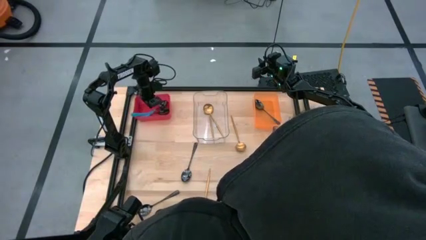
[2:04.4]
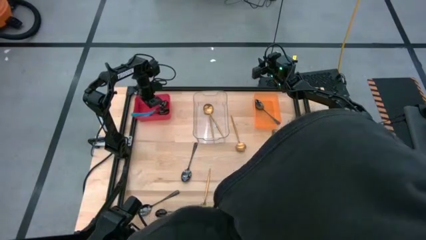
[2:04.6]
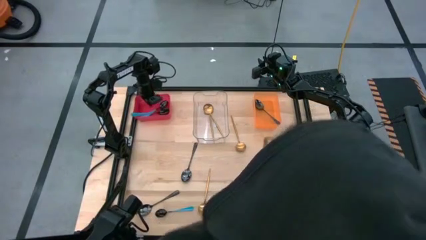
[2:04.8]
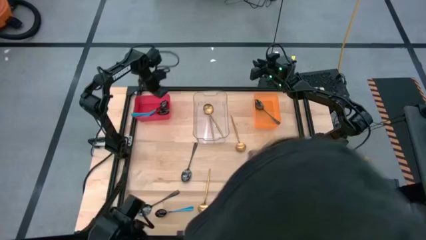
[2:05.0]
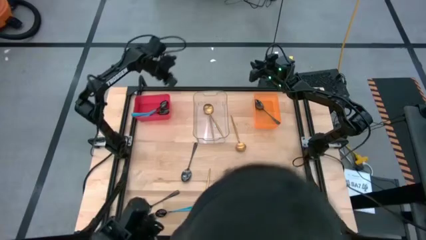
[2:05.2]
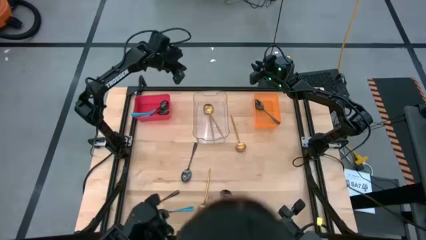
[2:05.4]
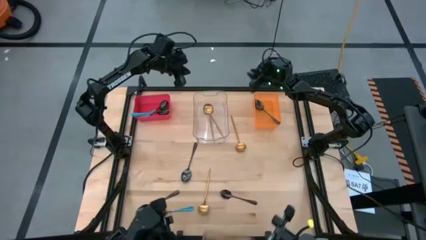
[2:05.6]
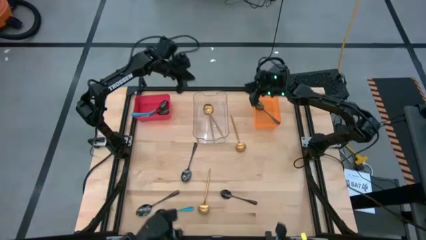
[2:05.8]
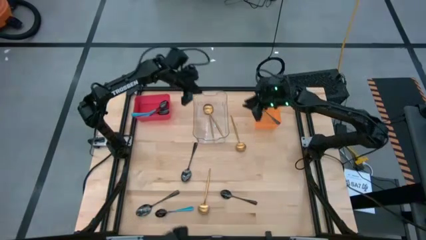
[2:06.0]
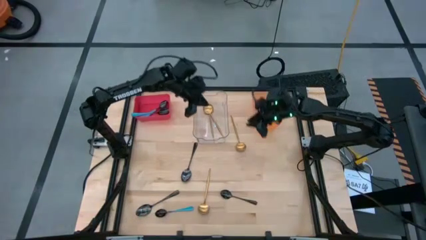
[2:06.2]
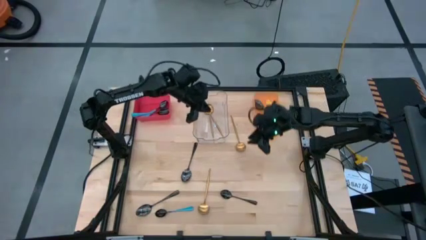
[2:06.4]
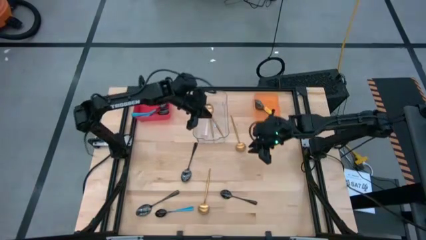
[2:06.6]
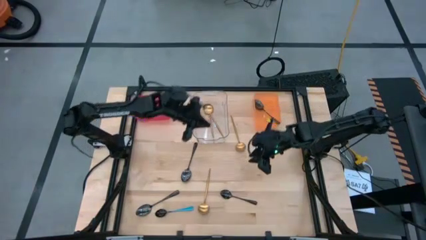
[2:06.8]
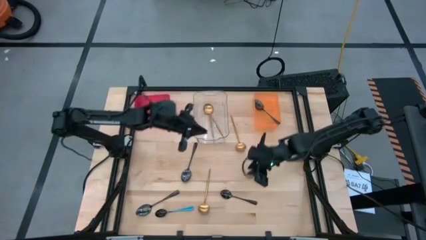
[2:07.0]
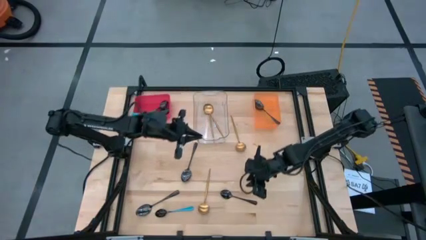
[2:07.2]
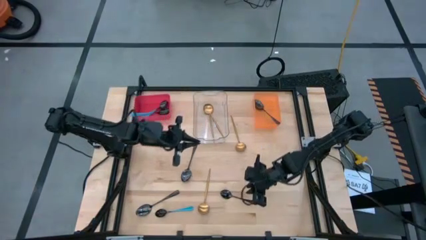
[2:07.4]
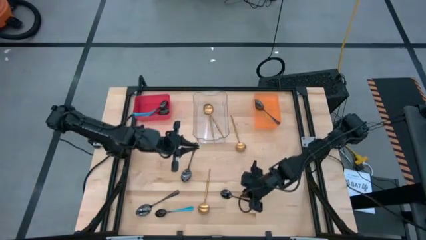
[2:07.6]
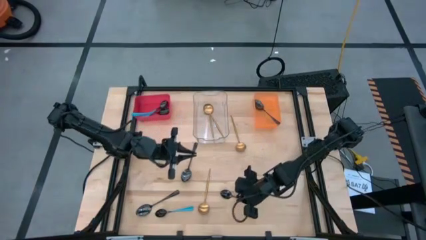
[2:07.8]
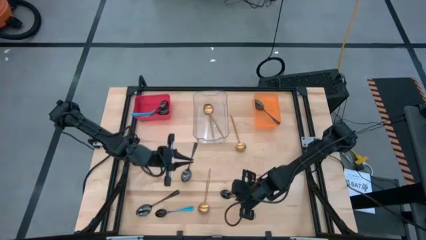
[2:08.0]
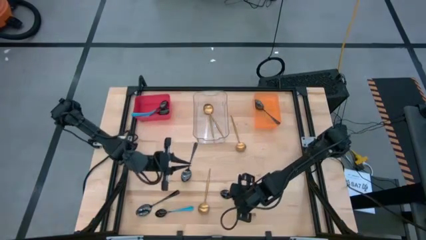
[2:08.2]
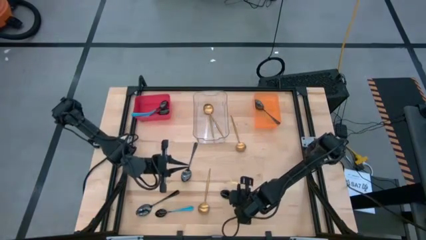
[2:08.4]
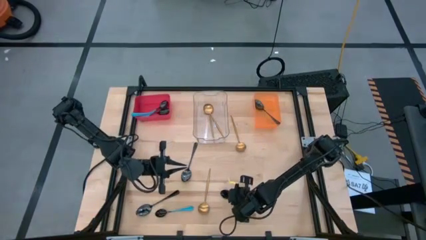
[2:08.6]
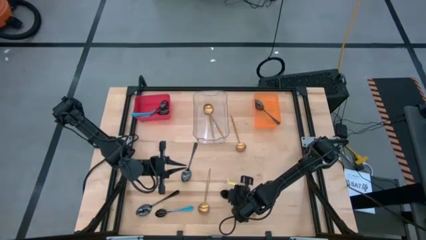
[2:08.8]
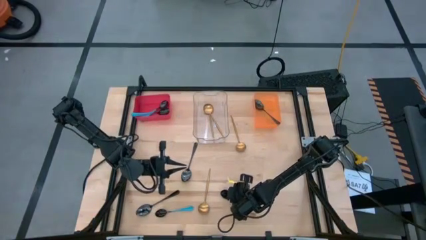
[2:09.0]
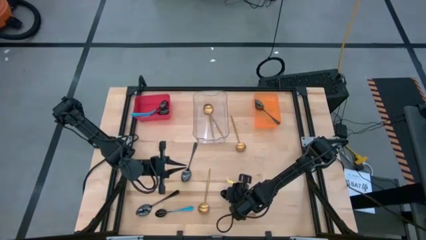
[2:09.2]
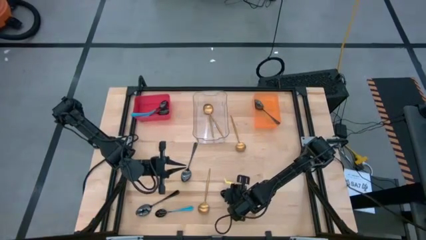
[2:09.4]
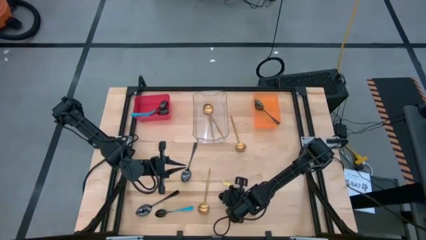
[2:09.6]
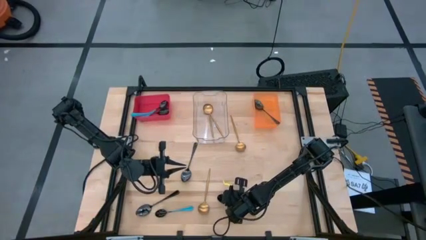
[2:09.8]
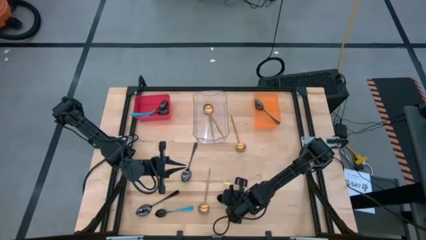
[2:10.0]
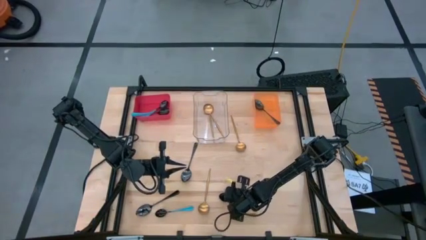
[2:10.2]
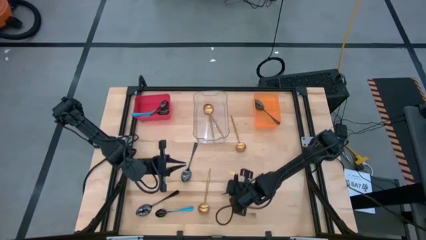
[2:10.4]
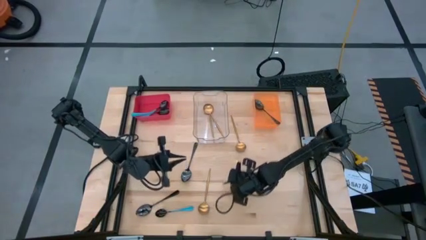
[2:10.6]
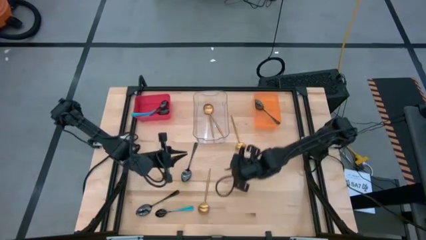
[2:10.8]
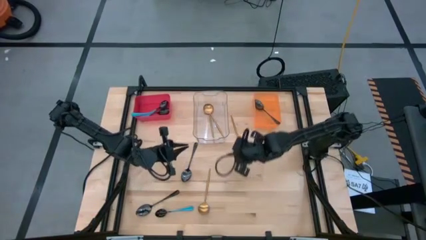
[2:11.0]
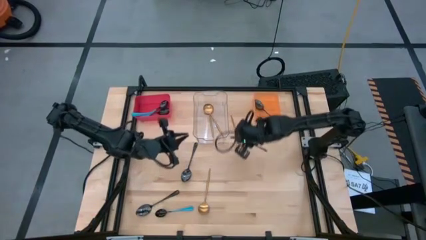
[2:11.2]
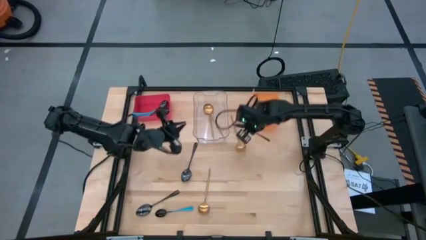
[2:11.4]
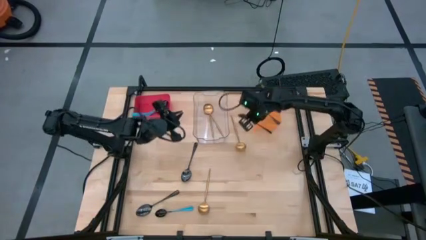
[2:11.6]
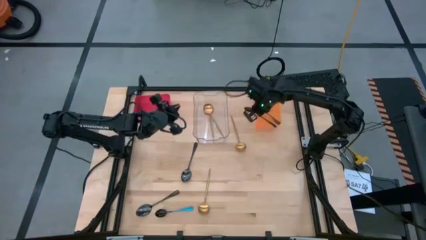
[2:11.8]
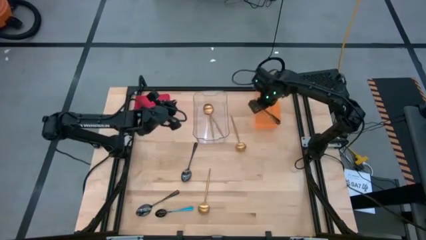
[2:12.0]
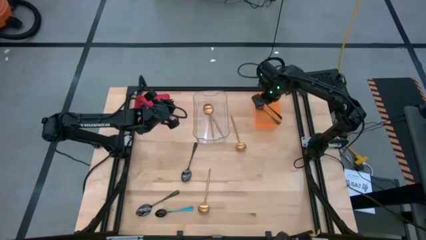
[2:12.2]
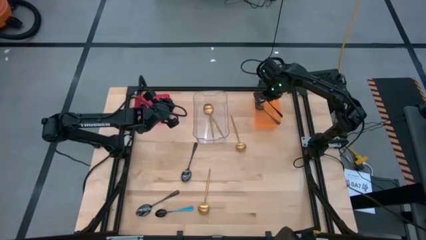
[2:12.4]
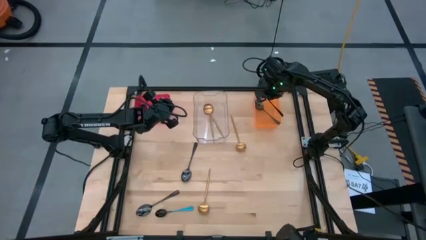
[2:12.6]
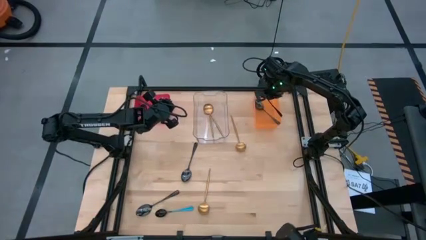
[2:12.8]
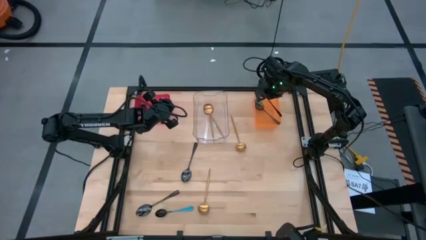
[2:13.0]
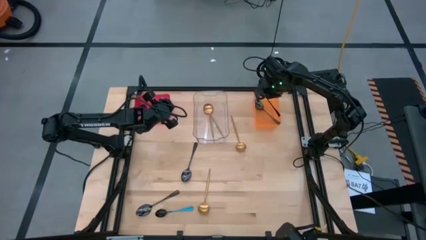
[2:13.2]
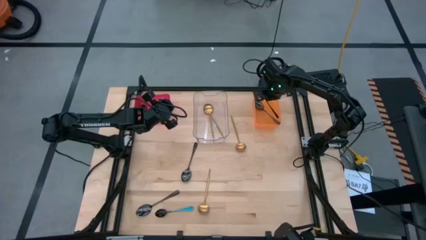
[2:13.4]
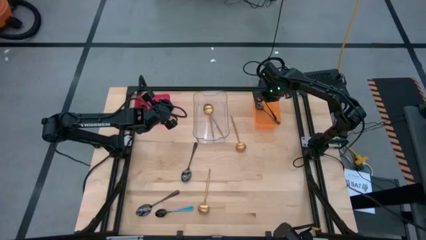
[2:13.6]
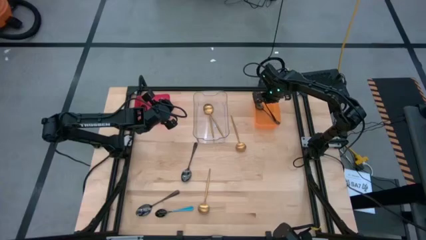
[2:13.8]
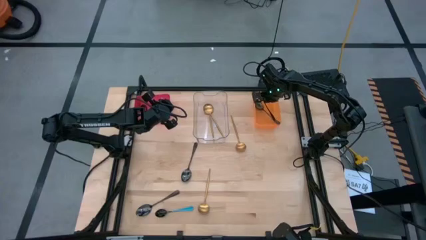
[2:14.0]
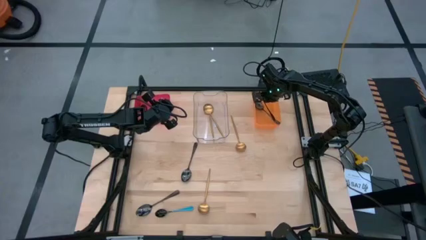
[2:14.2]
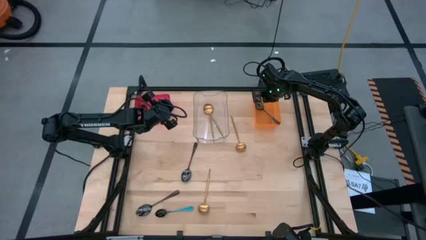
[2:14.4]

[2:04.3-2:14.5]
Task: Sort silverware by color (type)
Put the black spoon into the orange bin
